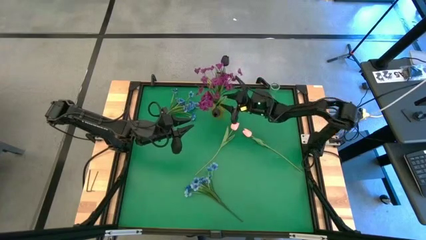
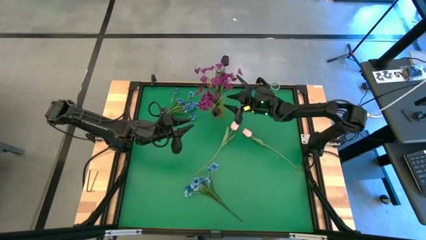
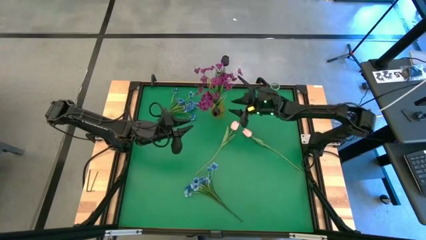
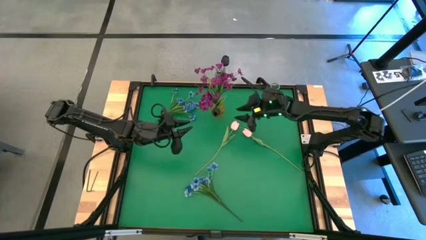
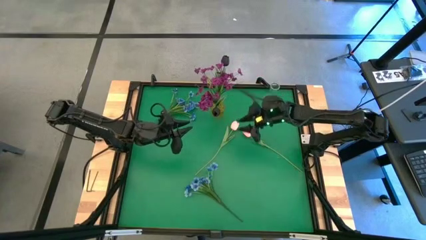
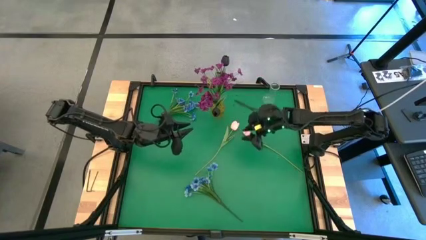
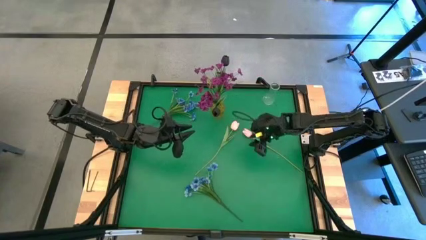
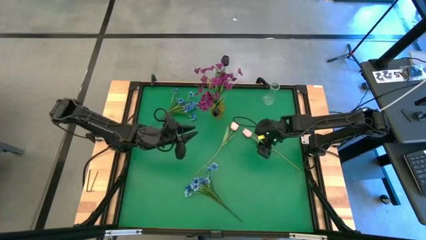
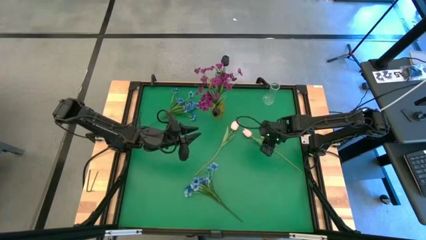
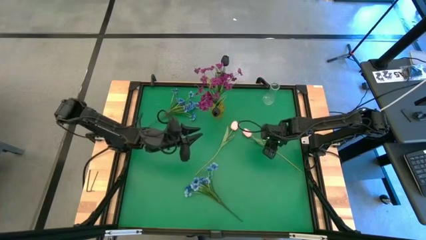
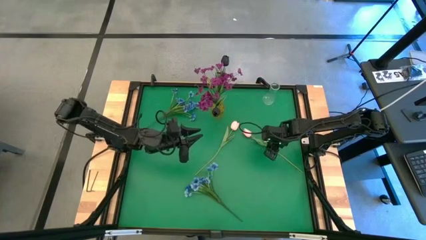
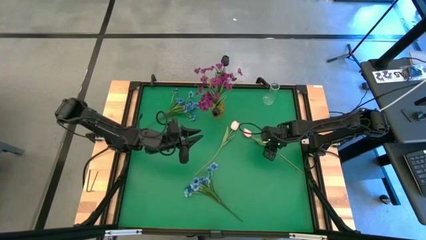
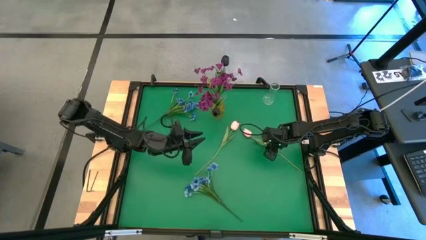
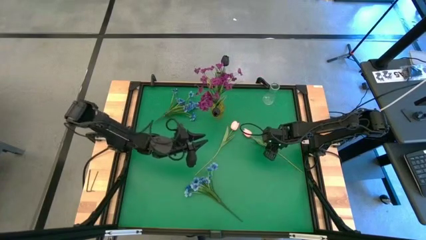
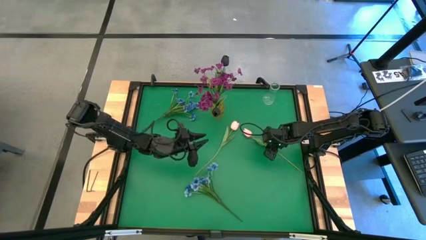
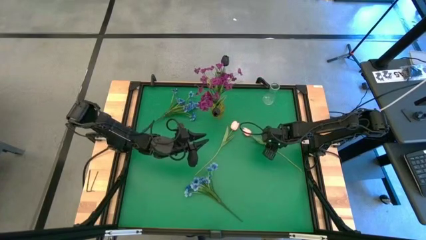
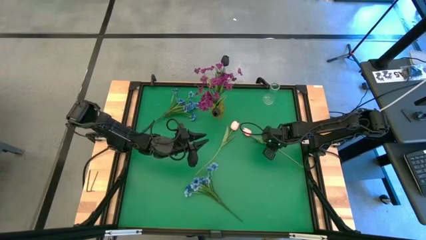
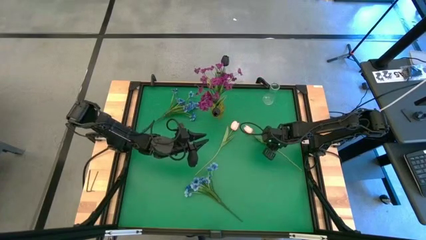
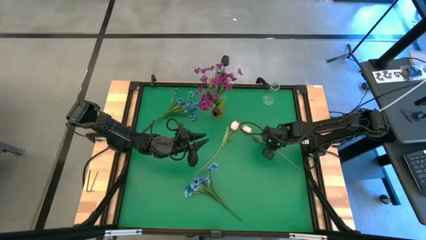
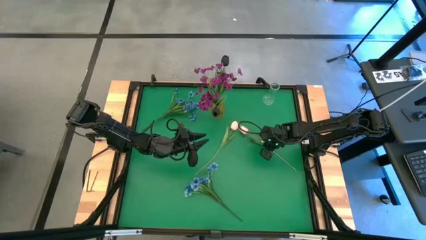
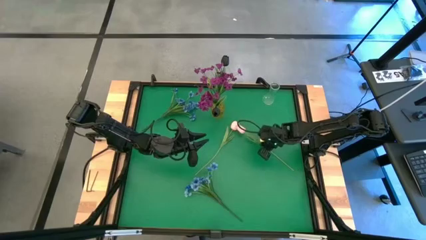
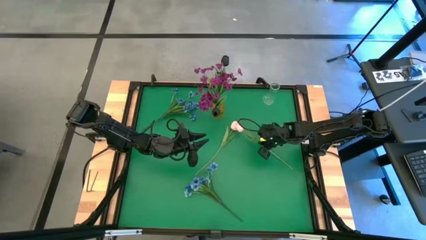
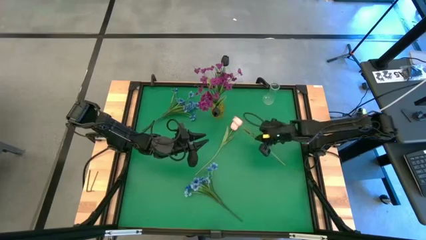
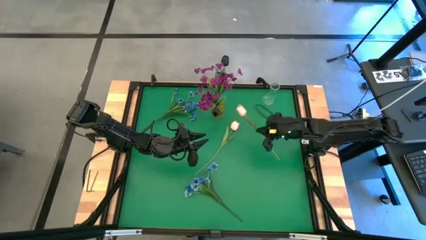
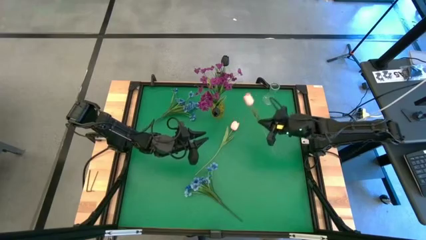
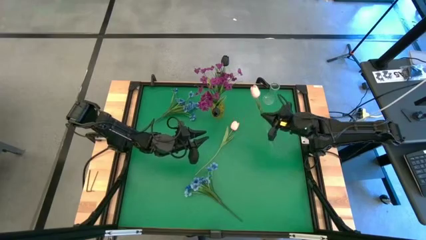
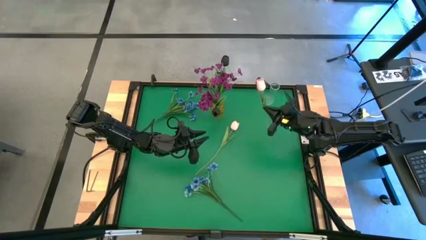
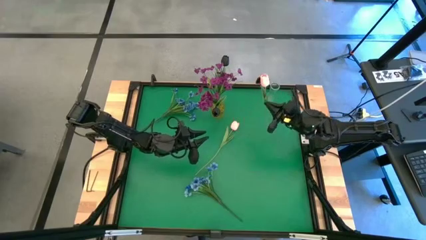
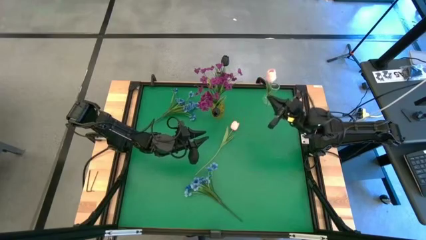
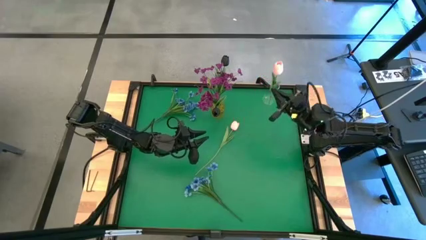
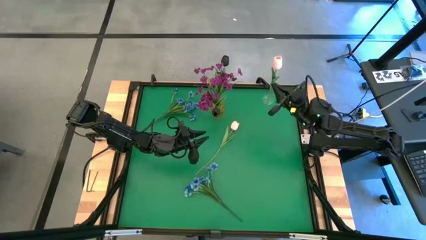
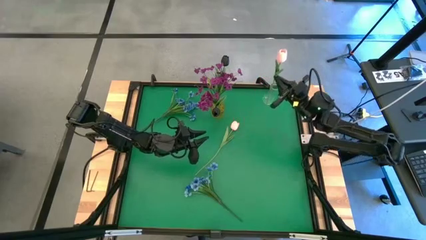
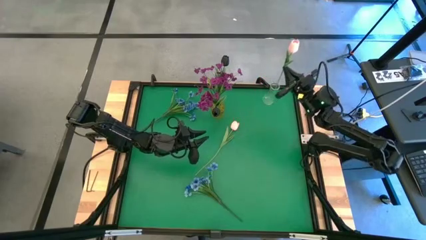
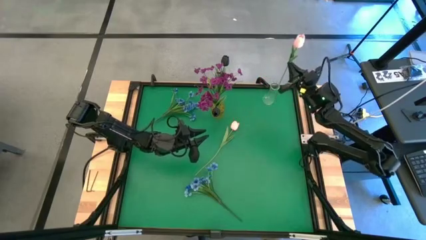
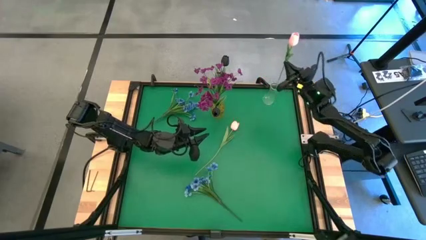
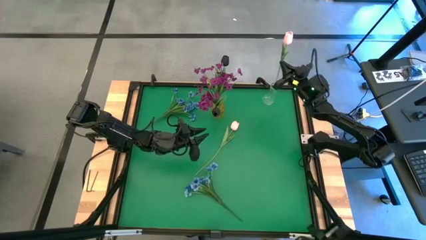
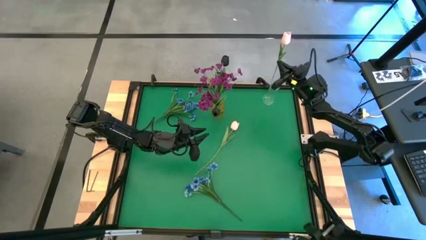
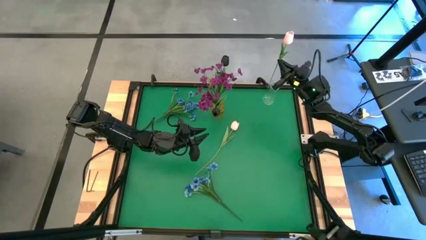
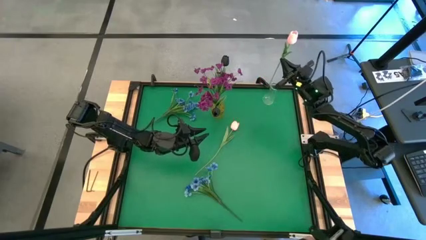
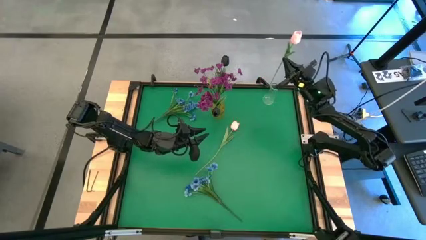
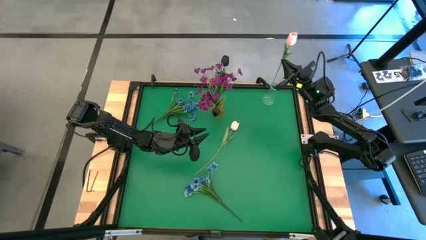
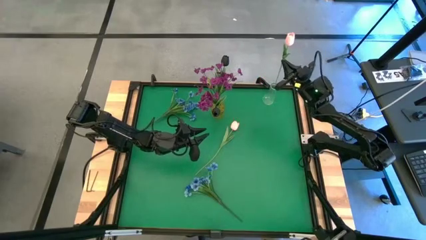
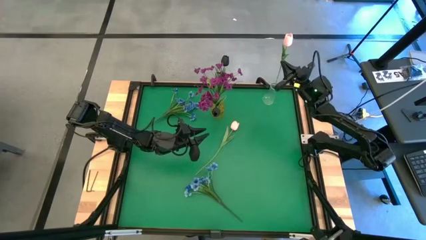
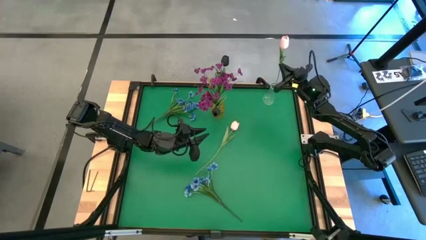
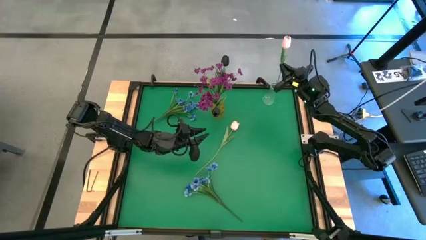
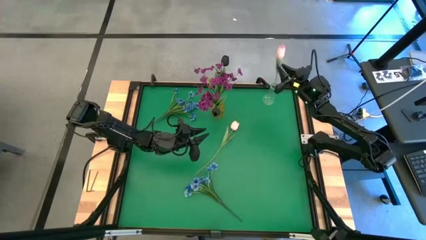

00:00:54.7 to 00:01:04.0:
Task: Sort flowers into vase by color
Put the right pink flower into the transparent vase

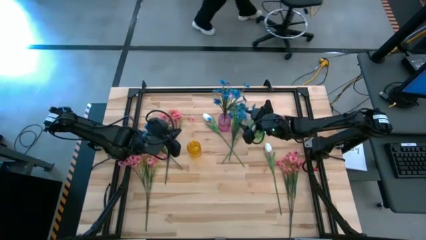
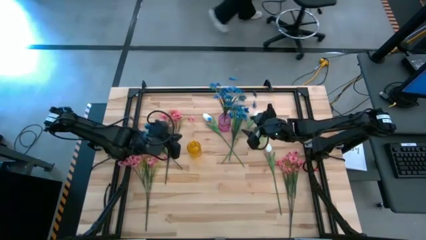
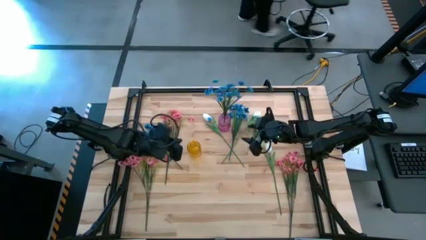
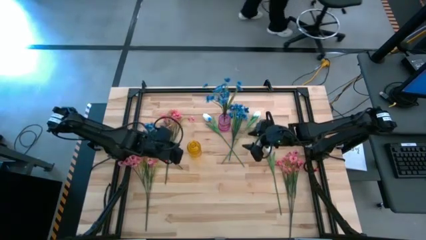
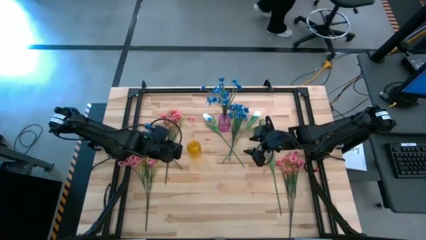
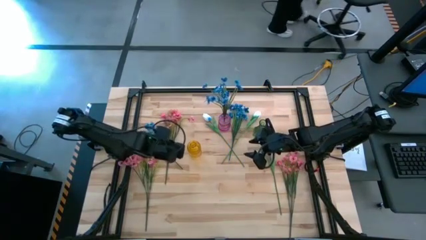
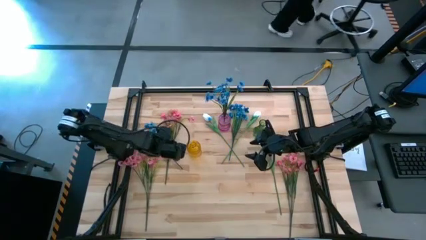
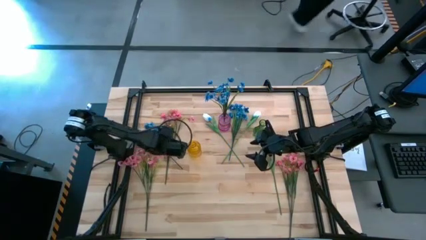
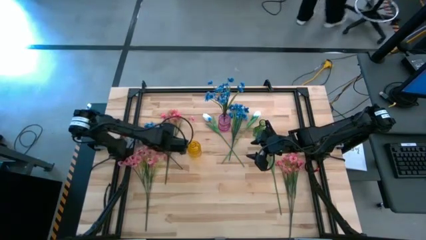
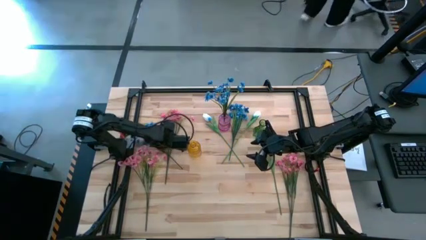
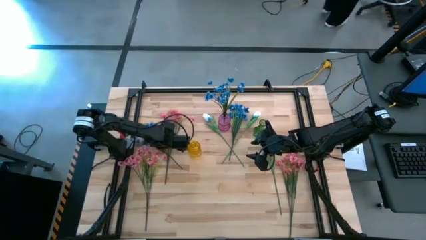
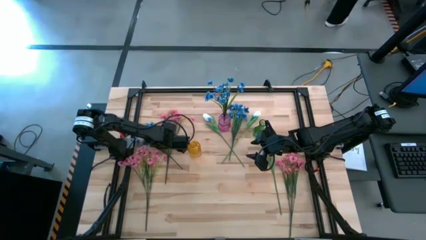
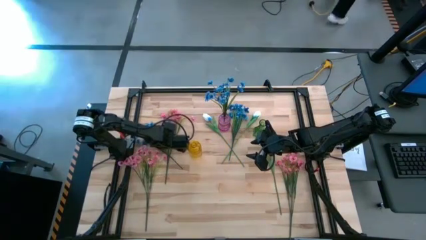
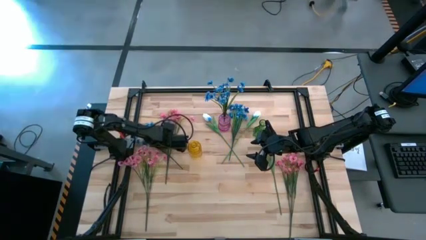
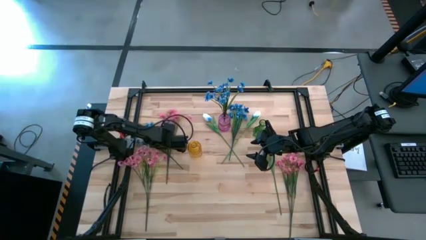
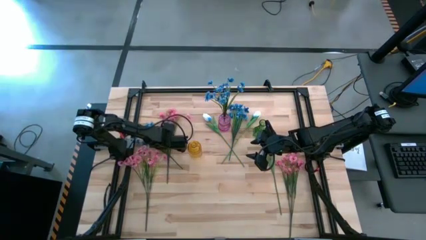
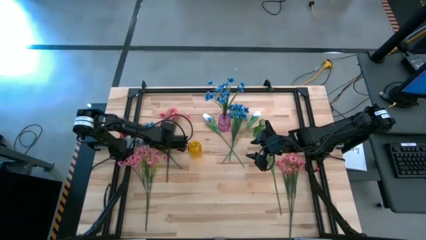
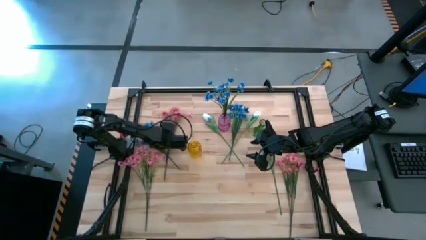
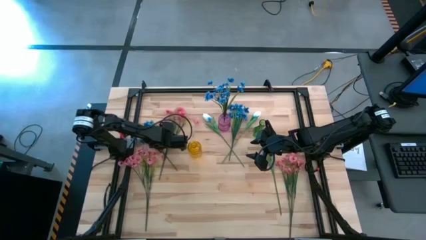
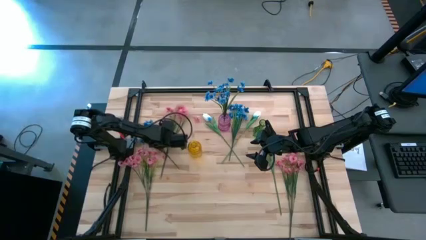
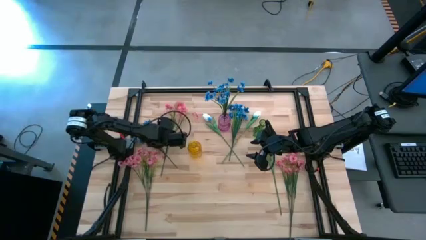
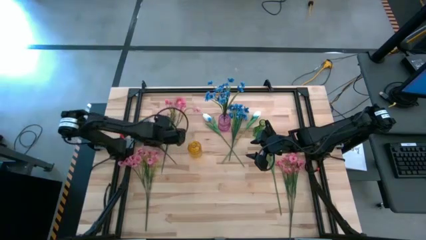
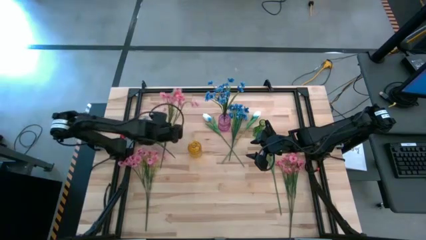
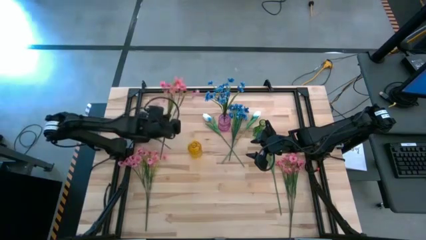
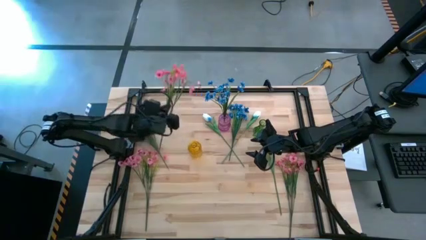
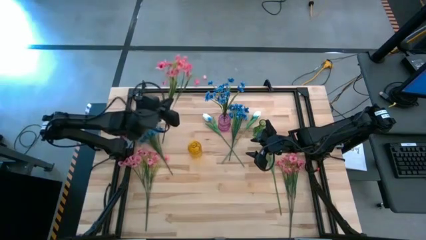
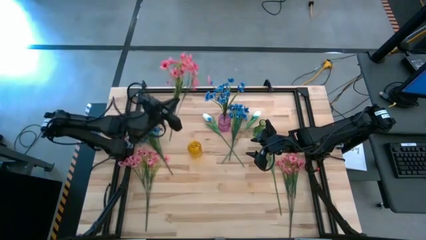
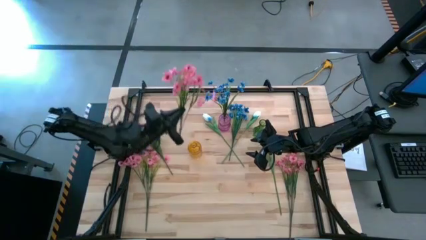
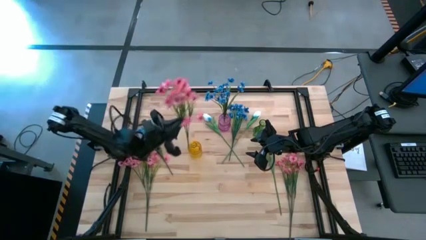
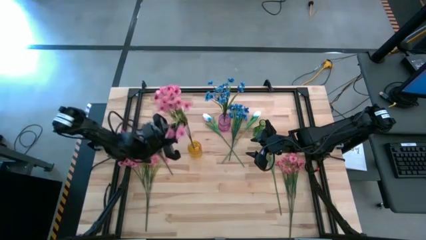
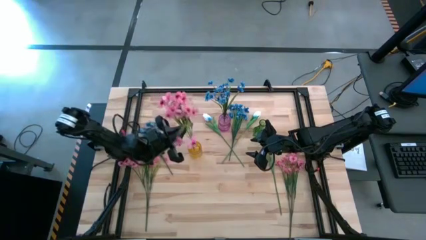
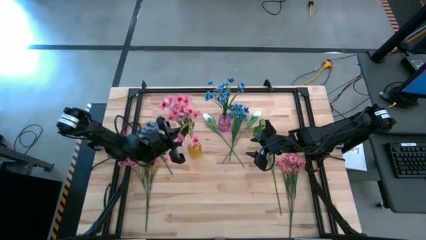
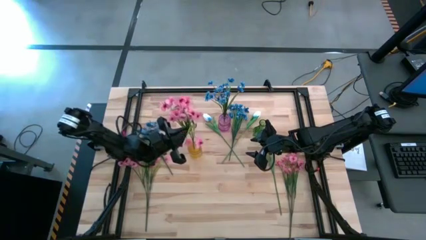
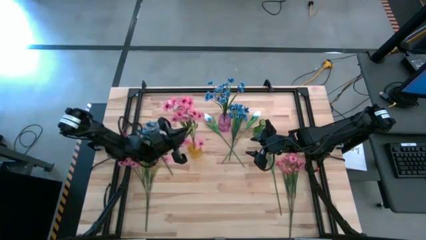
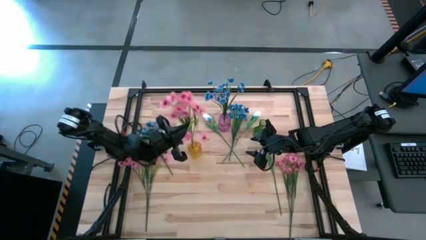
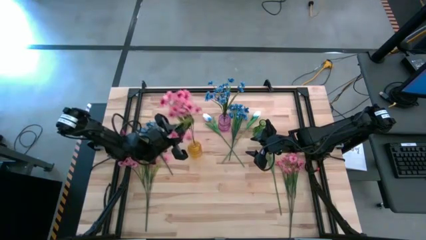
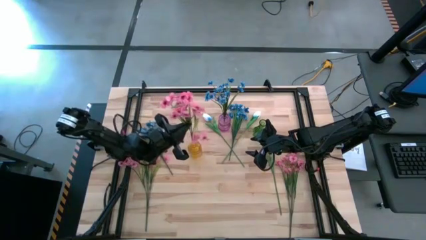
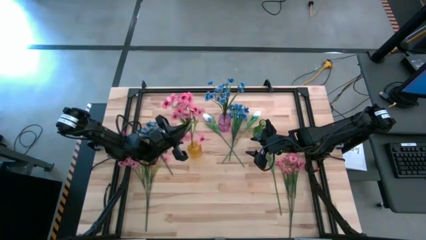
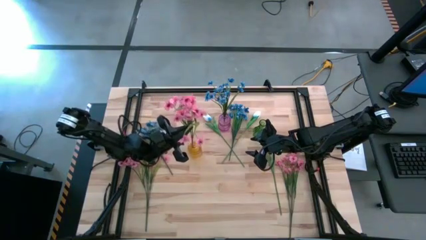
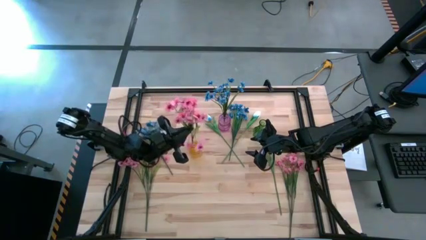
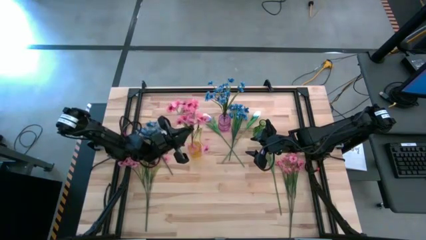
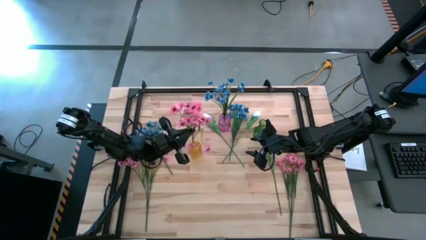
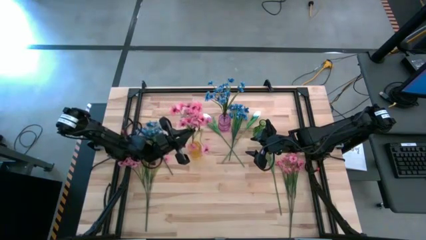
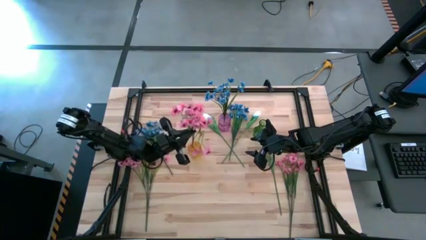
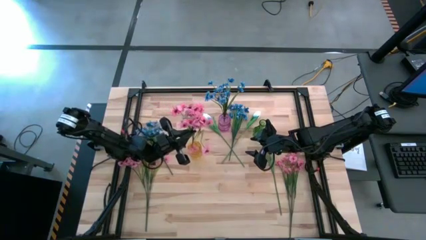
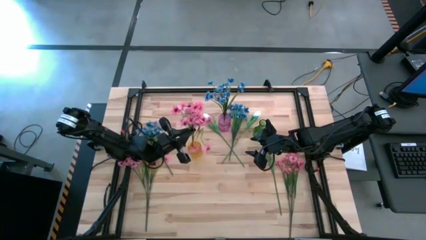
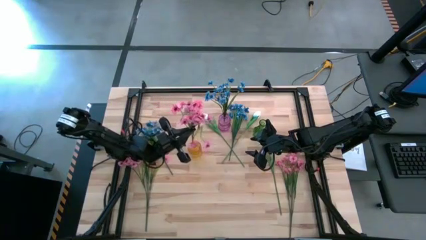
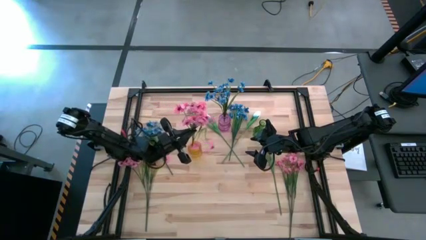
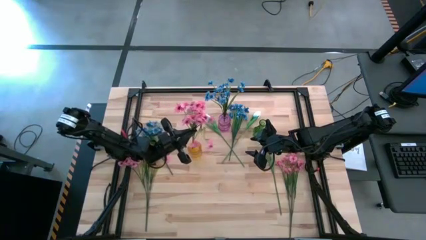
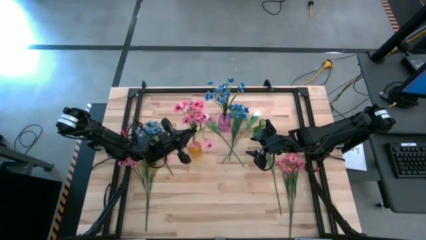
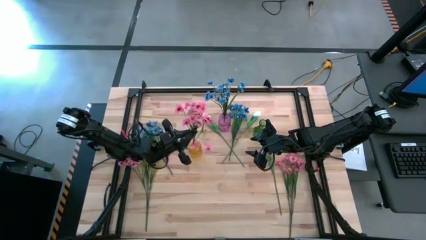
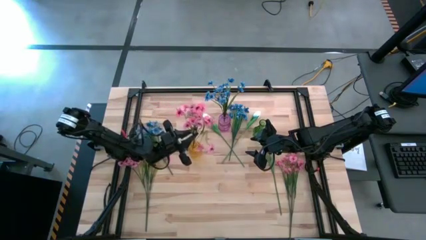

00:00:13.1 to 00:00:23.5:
Task: Sort flowers into vase by color
Put the top left pink flowers into the yellow flower vase
